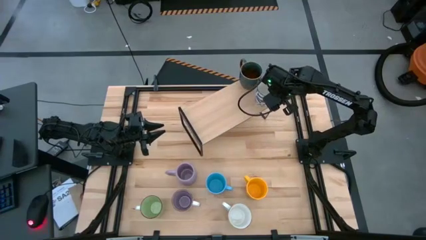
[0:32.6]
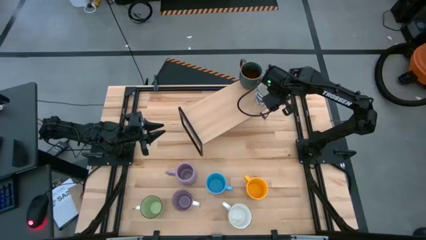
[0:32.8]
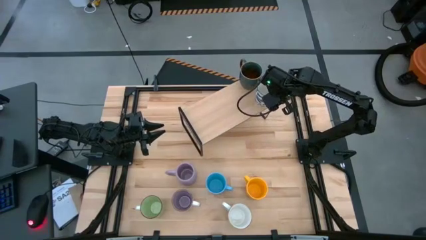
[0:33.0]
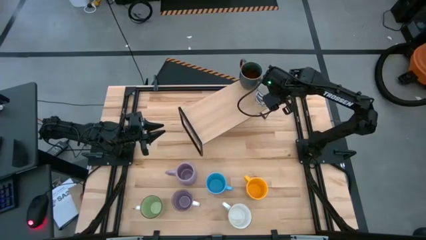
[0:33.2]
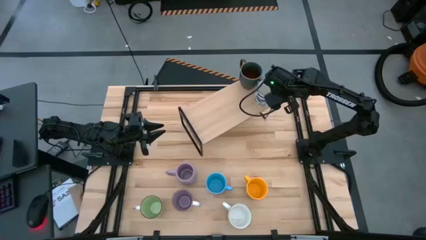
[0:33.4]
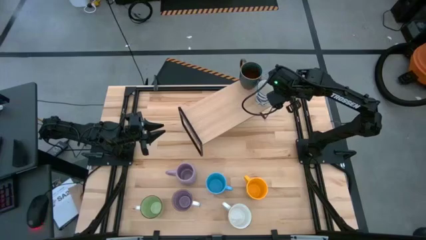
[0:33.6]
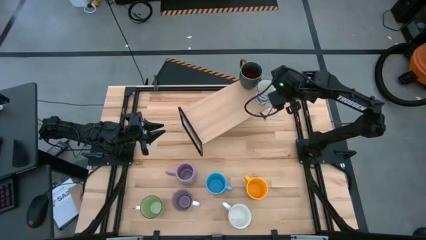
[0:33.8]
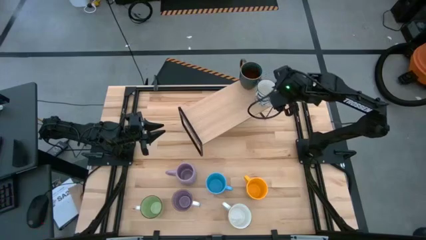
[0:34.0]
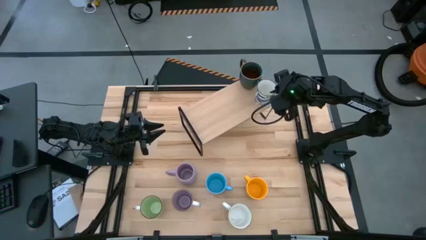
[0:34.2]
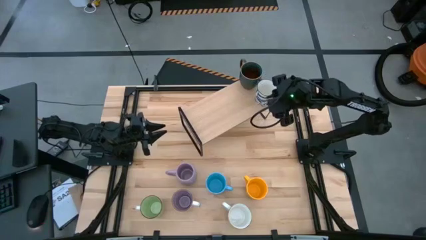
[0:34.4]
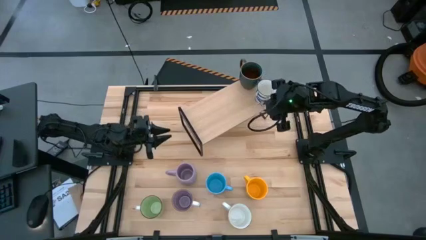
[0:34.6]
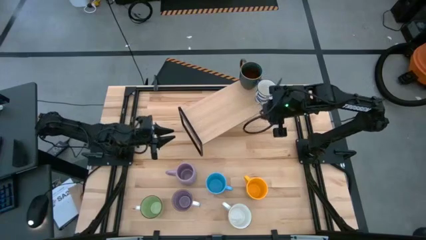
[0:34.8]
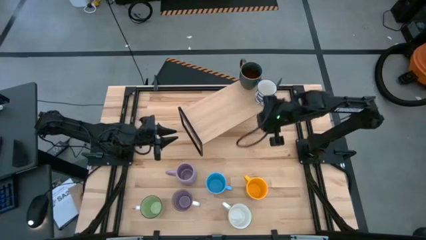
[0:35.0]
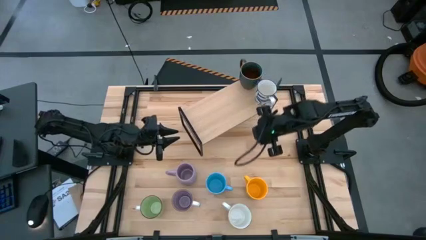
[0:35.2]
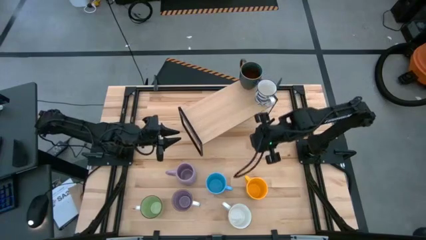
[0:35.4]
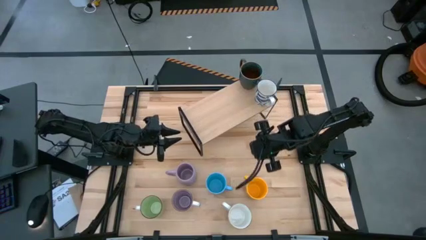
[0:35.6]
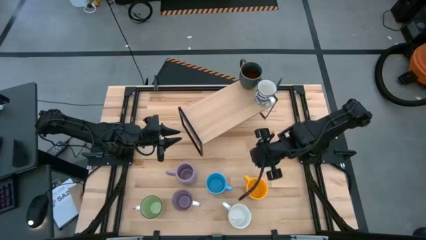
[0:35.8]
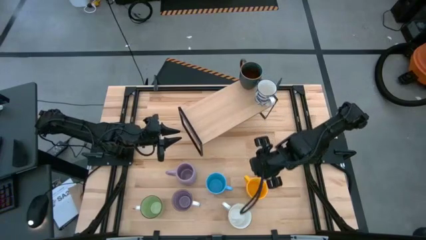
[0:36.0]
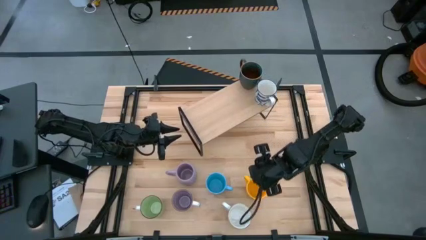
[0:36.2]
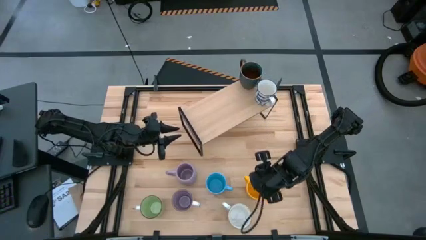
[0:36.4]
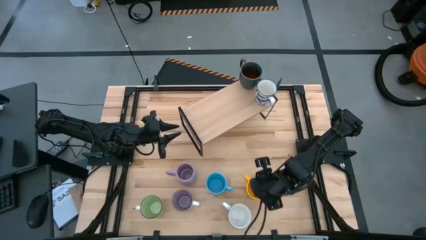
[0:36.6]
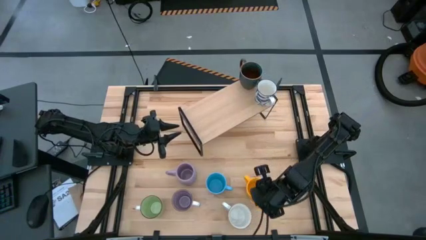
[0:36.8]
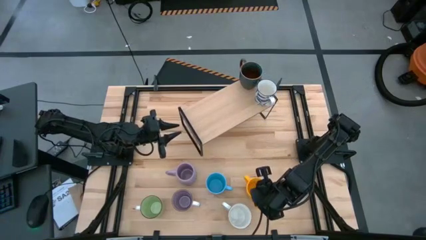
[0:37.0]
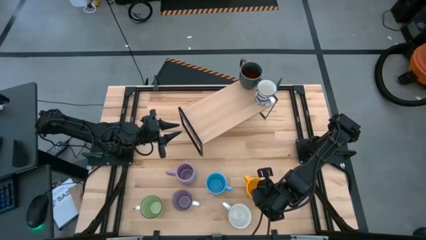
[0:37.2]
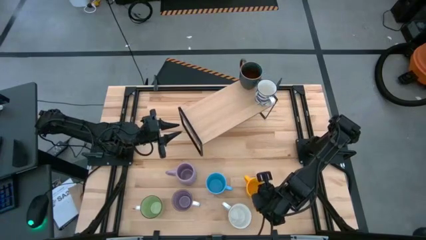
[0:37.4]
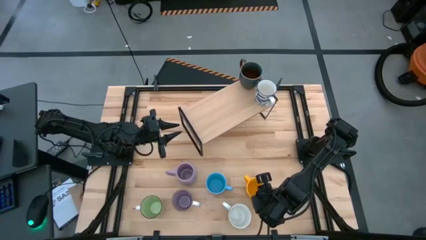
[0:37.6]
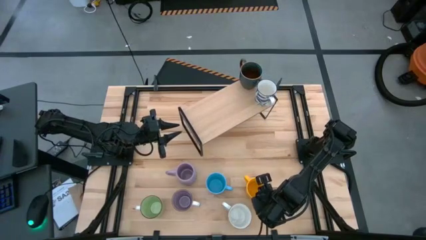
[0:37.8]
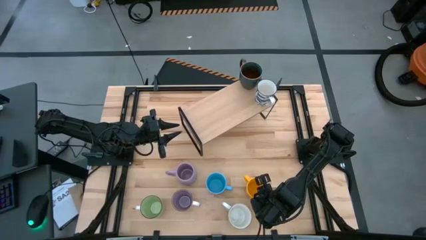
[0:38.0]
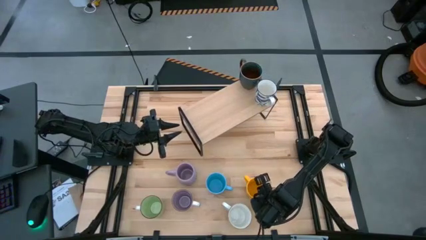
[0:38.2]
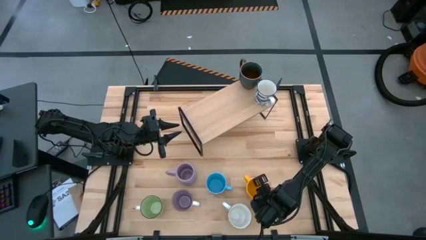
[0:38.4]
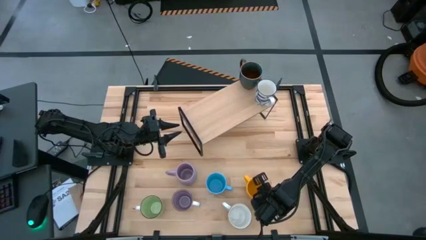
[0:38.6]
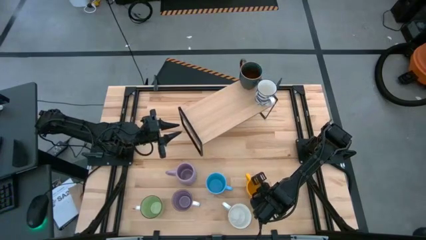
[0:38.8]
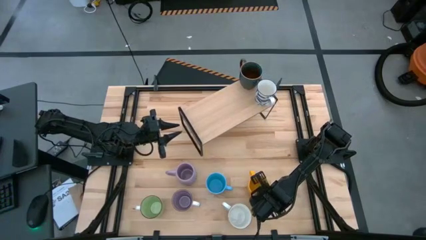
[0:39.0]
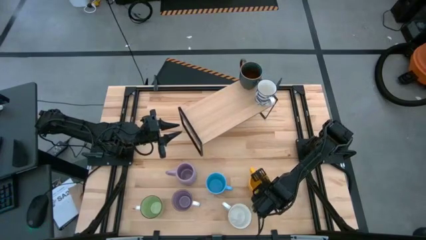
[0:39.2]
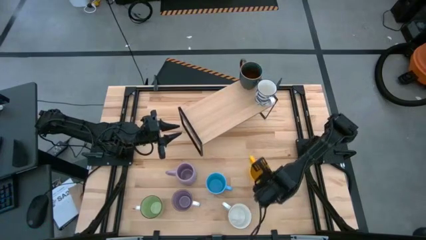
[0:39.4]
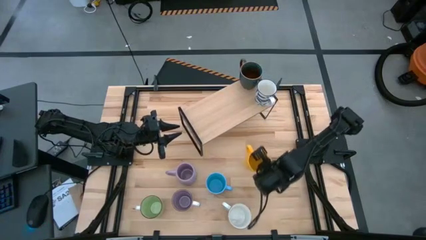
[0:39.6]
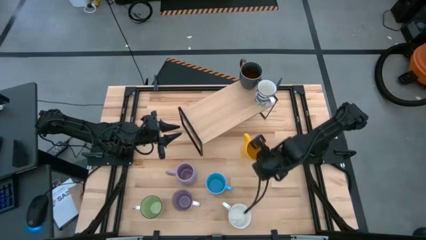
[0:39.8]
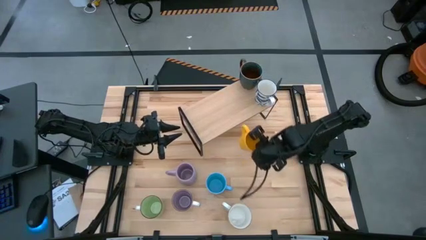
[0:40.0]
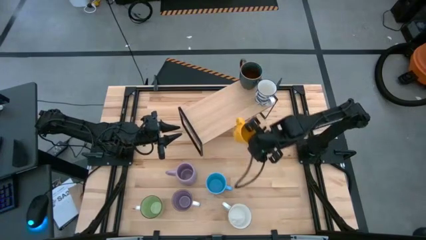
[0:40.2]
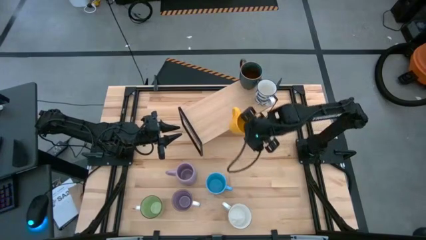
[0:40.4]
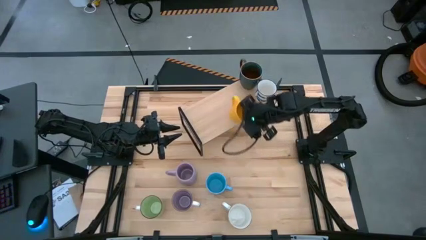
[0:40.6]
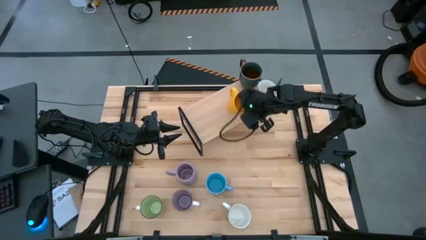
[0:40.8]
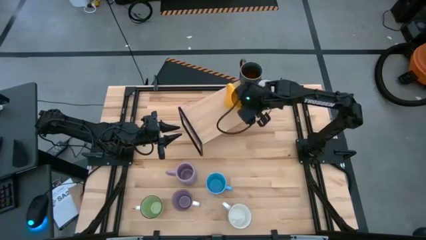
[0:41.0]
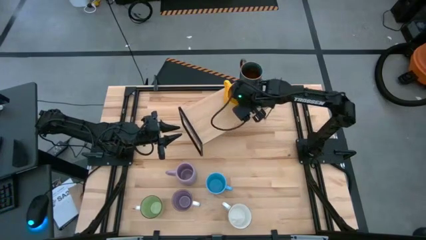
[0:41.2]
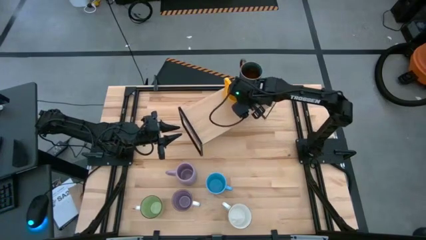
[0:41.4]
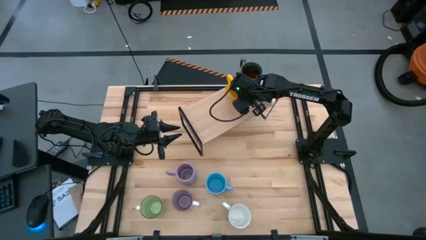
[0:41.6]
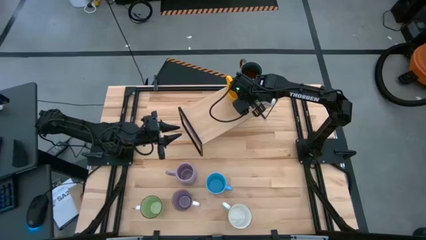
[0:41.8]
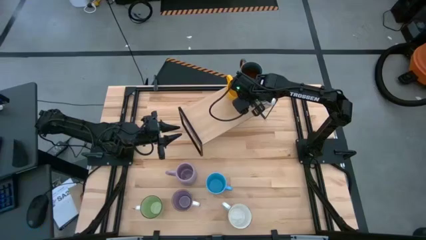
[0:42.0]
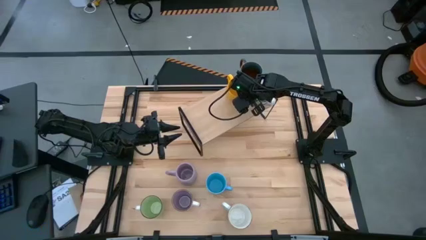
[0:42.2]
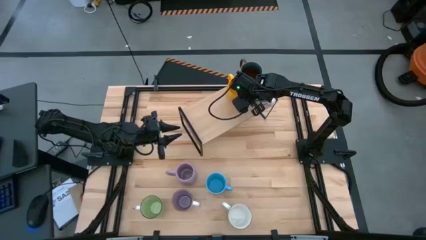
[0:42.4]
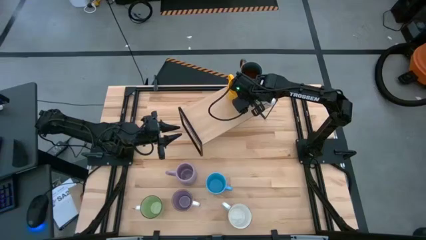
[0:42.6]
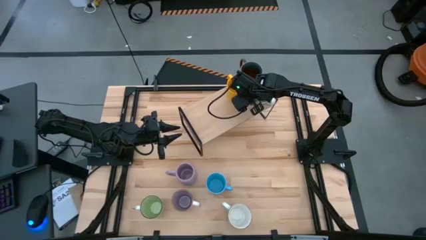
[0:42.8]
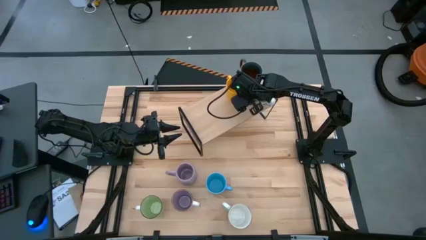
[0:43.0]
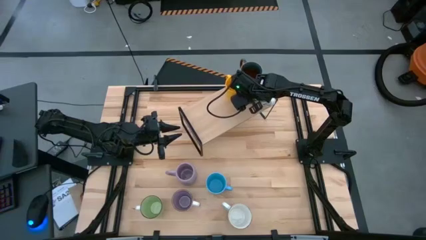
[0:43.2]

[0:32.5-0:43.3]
Task: Place coffee mugs
Put the yellow mug on the shelf
